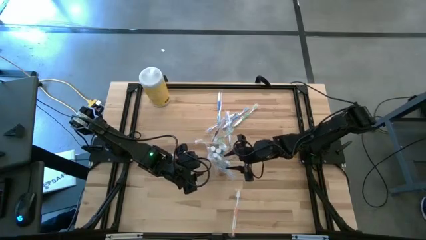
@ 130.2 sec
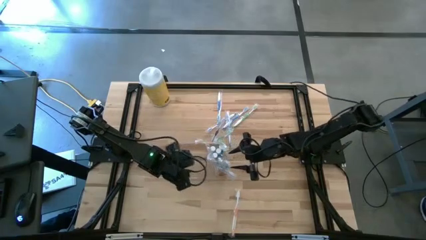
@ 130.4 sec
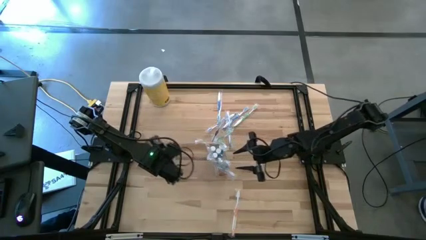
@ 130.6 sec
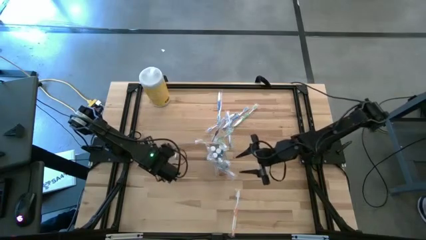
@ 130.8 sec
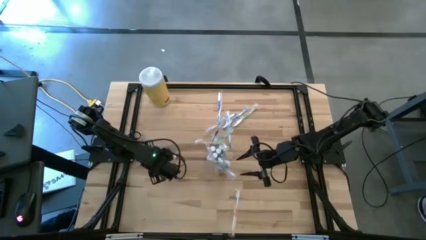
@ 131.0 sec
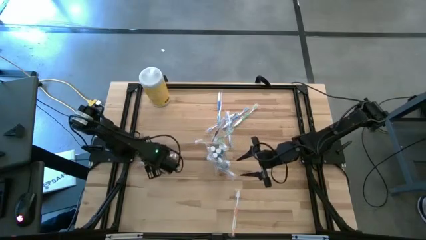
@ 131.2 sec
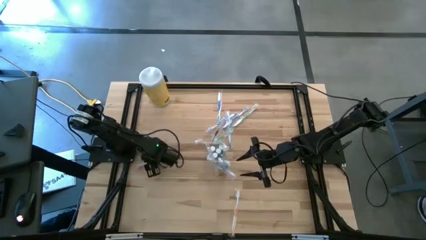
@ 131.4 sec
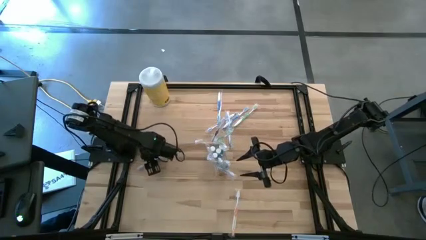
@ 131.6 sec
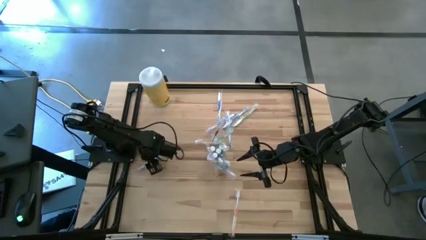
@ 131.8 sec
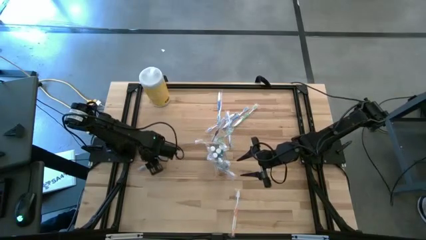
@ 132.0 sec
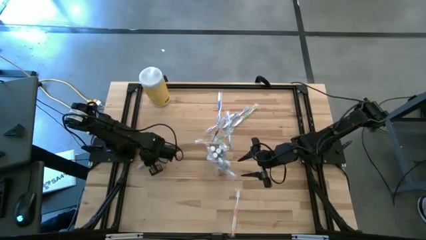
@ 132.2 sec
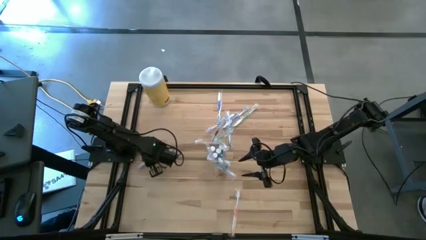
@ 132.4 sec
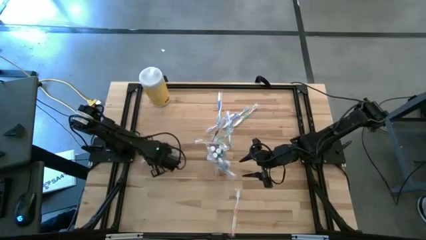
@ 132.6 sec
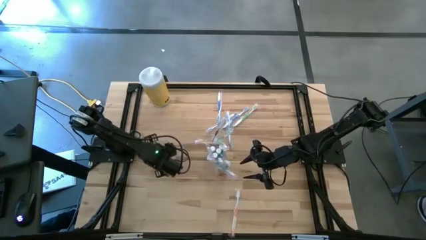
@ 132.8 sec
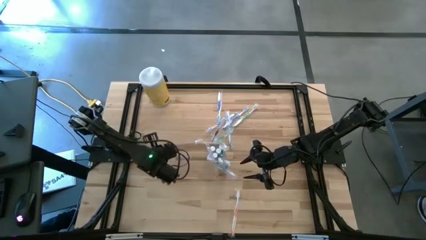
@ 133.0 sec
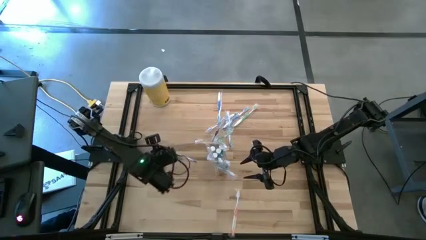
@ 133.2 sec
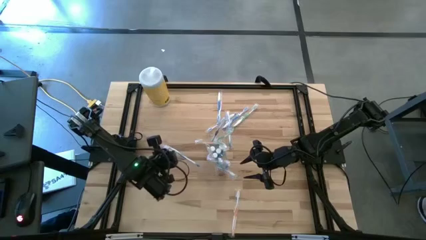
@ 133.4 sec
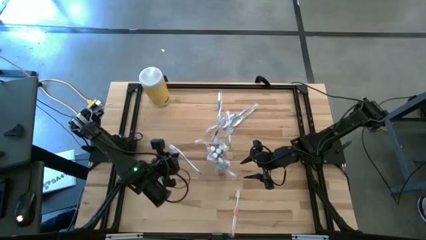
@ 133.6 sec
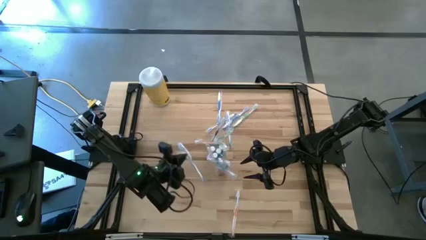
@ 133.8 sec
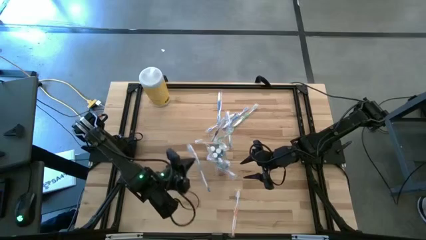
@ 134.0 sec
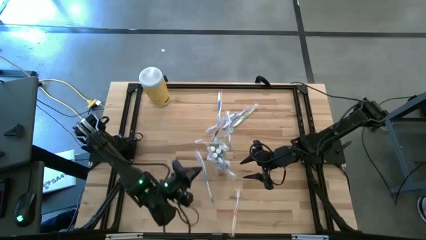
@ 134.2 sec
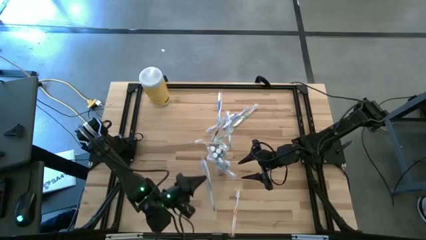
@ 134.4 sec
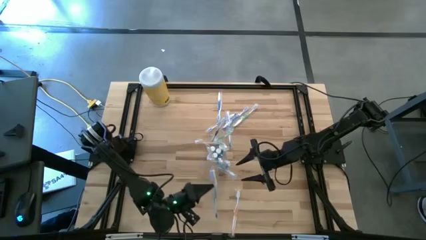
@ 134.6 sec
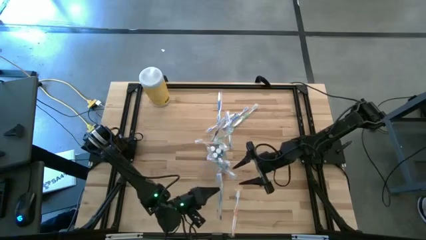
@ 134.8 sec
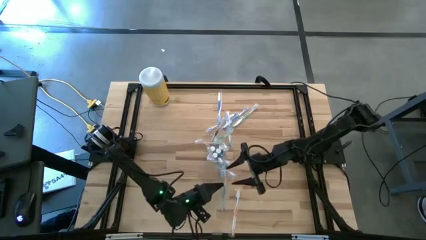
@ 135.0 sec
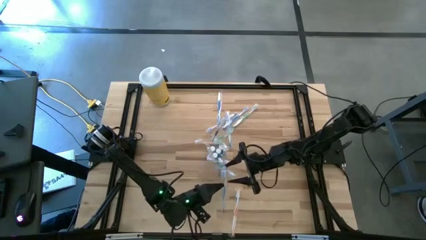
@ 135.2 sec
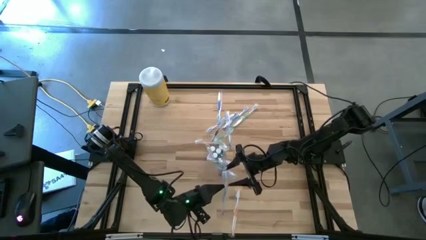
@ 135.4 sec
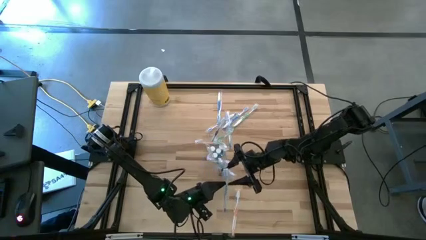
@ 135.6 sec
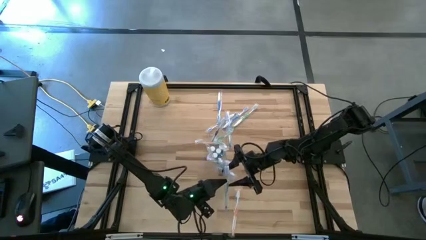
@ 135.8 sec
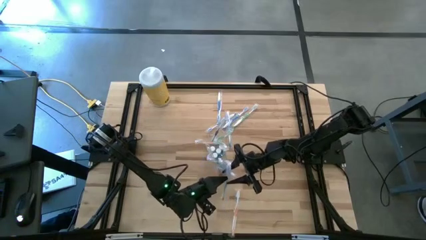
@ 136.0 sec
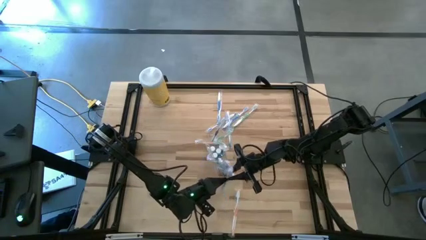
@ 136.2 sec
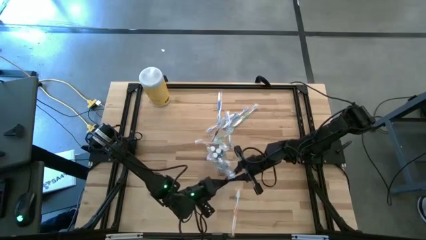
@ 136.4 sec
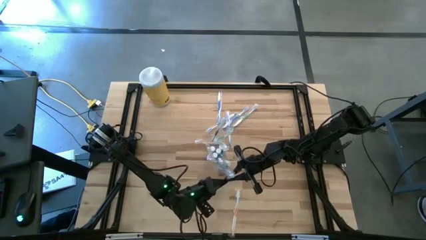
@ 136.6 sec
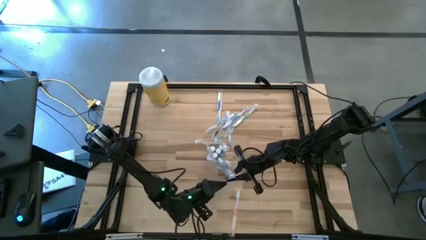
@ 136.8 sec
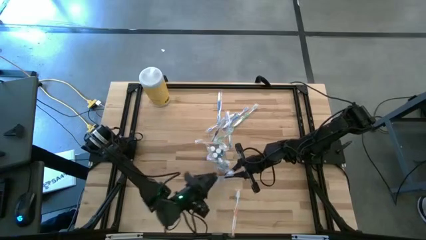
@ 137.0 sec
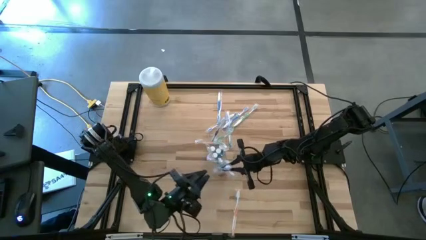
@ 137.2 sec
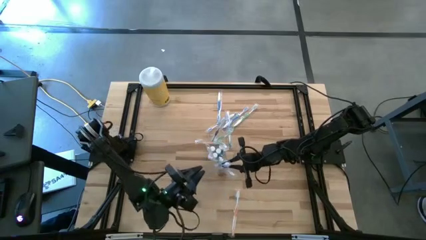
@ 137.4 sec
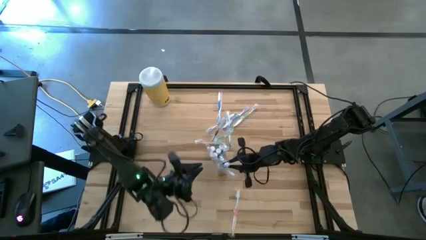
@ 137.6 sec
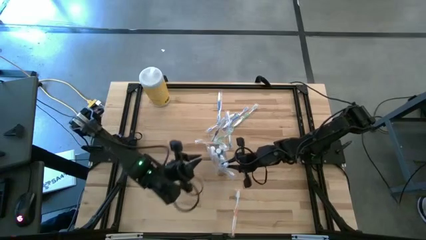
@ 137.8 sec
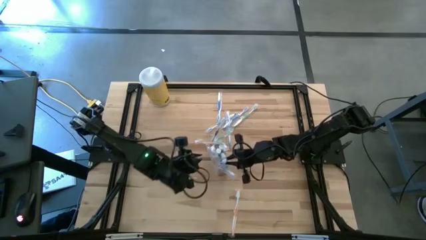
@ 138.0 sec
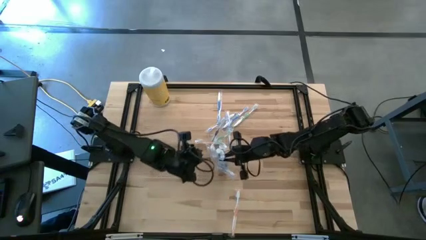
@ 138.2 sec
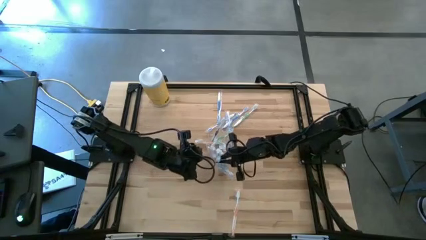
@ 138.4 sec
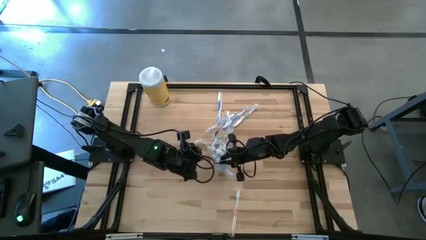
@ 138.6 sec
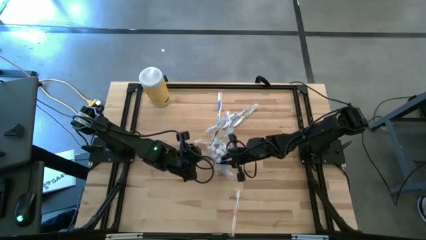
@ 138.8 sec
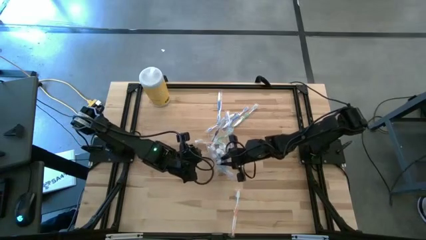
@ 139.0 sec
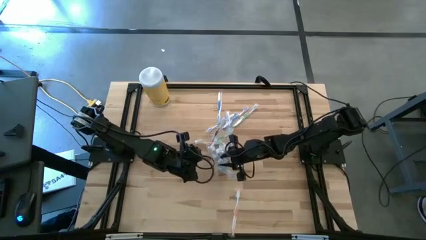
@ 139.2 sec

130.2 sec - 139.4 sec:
Task: Pick & Place toothbrushing station
Put the blue toothbrush into the transparent organizer

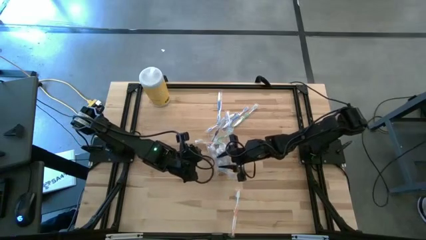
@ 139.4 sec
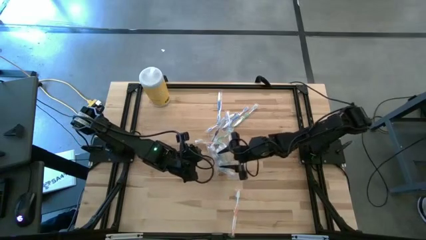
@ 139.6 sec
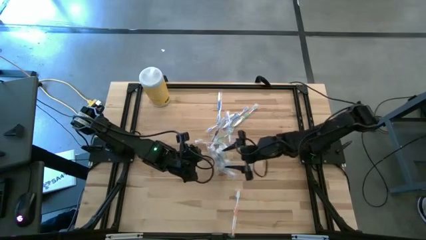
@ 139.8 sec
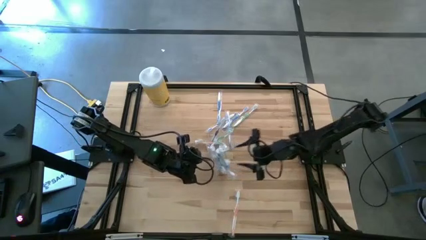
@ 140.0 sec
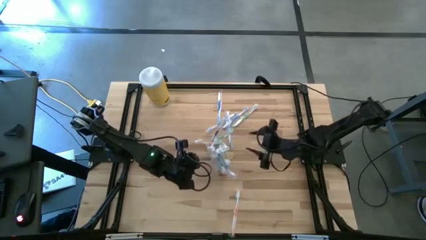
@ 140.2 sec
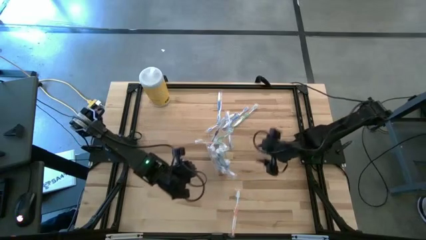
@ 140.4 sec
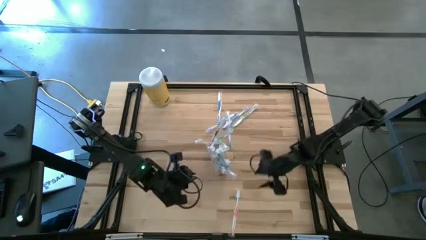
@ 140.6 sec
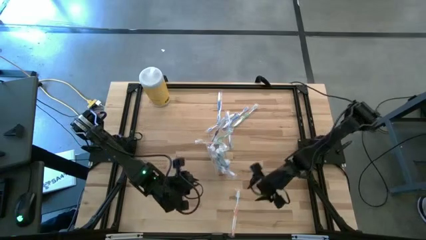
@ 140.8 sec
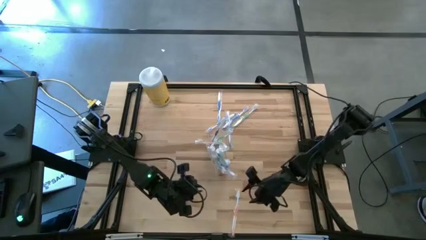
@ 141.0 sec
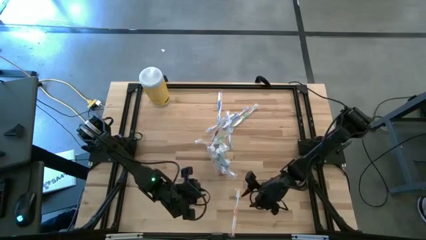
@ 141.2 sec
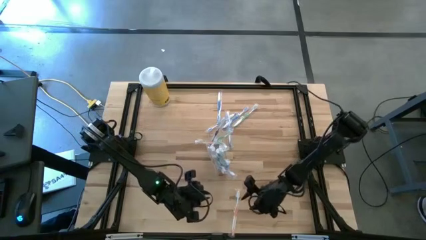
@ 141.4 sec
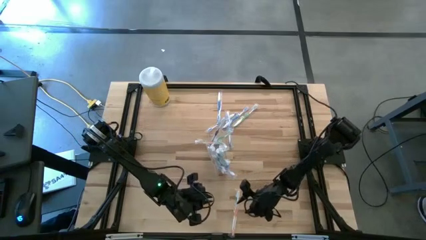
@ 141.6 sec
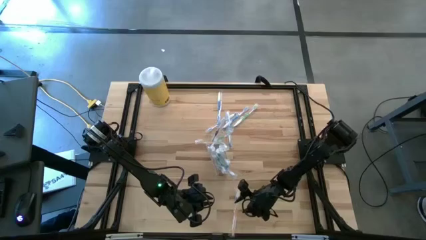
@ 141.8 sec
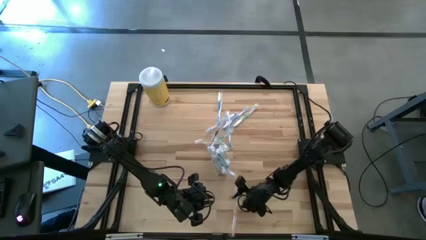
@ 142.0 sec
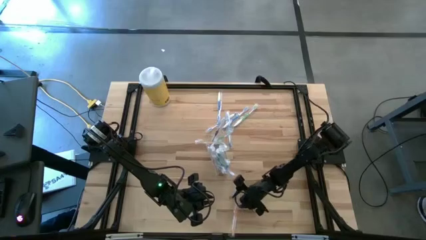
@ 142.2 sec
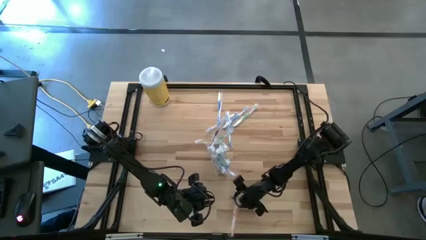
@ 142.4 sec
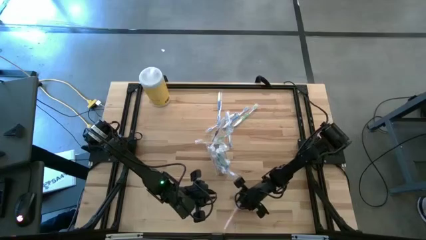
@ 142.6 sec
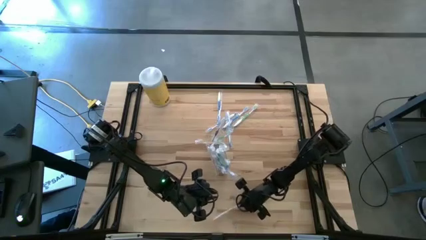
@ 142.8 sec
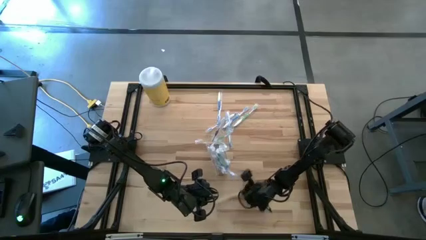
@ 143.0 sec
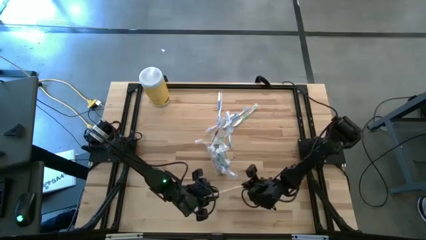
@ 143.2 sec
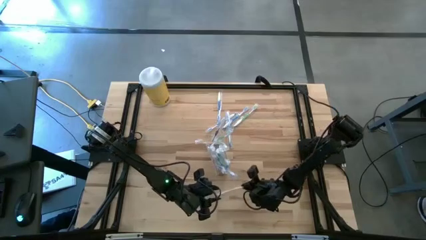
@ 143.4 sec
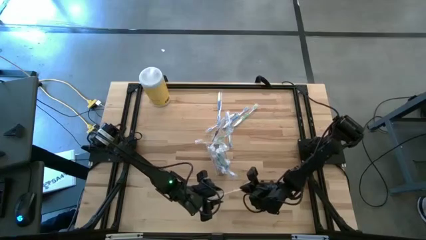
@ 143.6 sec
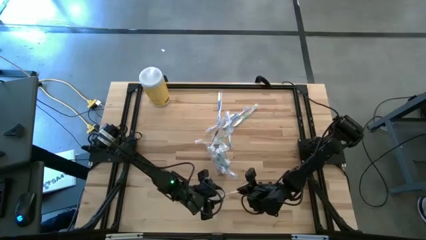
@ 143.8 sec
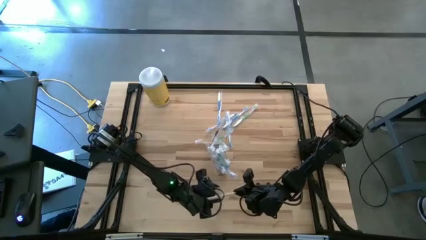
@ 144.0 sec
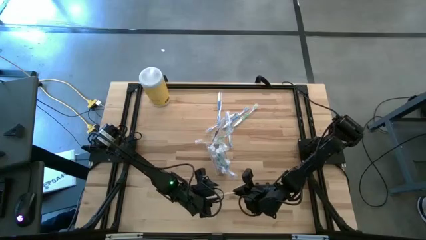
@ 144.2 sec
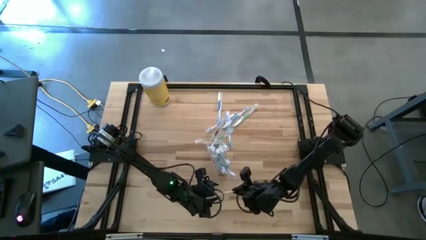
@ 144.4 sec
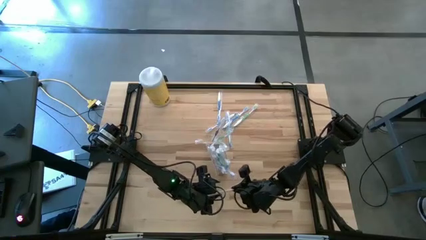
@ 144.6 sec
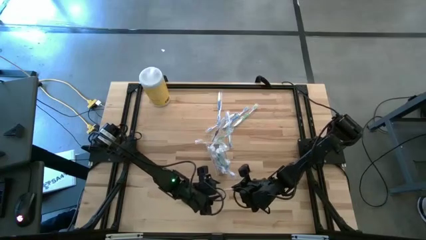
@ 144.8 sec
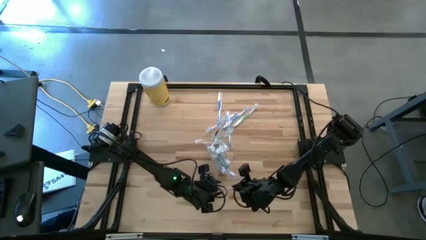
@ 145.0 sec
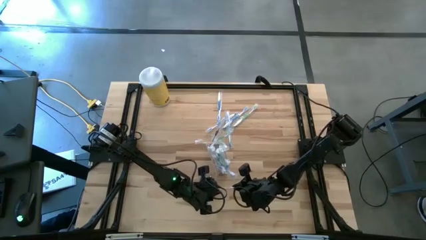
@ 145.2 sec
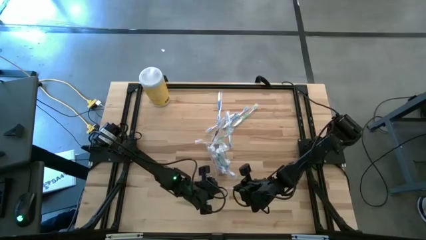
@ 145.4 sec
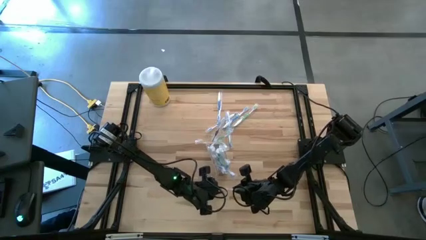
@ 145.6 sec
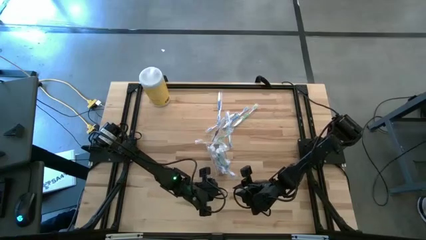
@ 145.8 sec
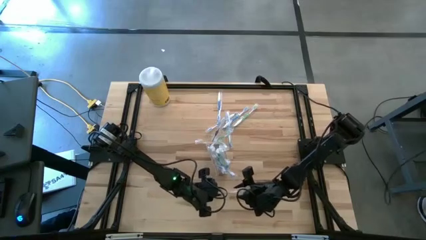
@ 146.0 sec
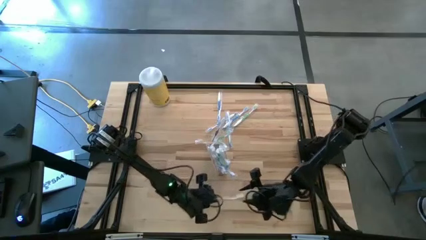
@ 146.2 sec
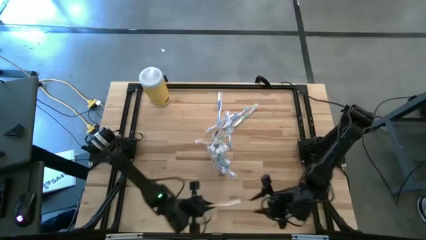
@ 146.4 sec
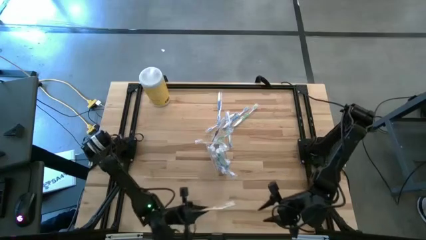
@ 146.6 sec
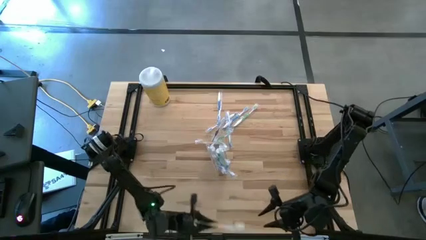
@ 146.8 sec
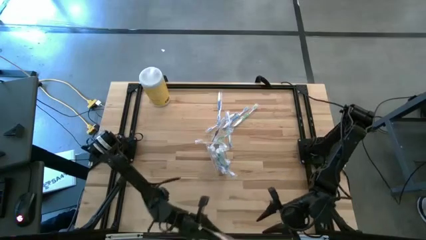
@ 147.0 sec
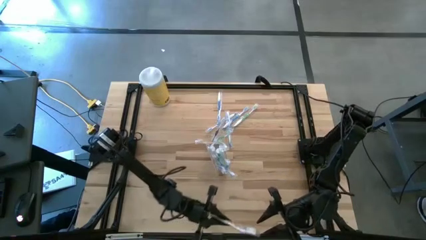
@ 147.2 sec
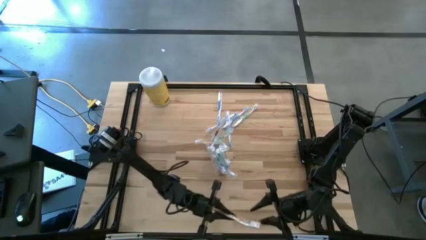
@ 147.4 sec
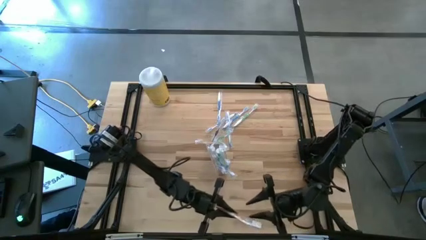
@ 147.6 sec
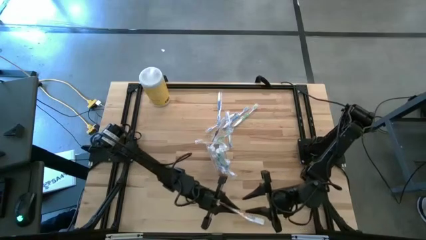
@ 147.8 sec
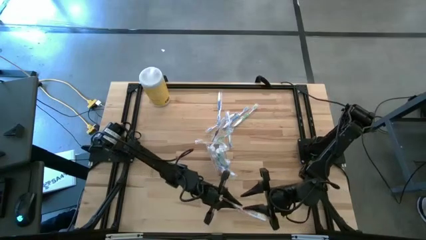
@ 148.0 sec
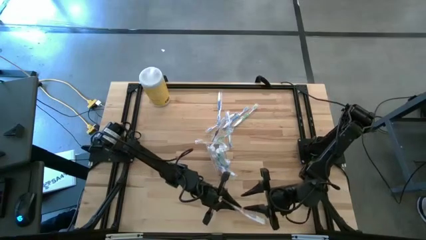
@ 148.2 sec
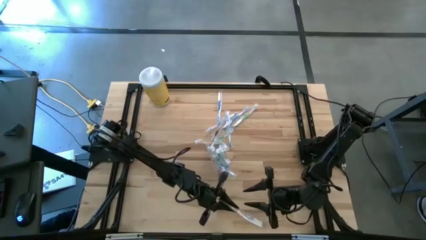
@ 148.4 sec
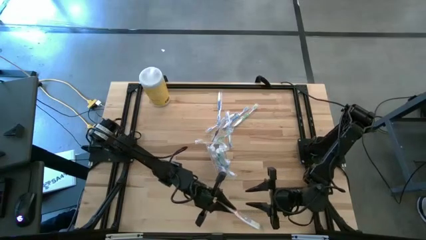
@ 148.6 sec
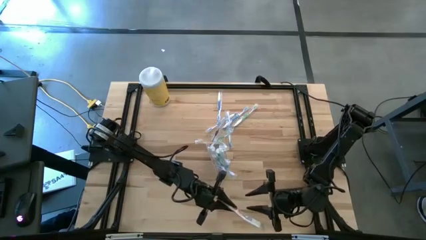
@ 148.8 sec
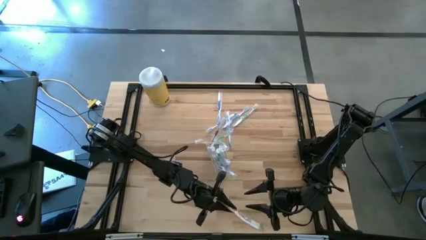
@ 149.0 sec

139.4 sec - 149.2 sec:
Put the orange toothbrush into the transparent organizer
